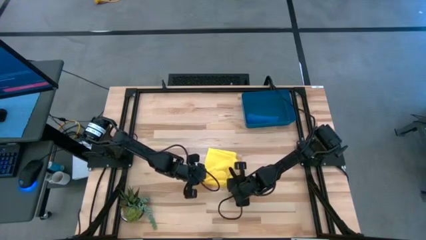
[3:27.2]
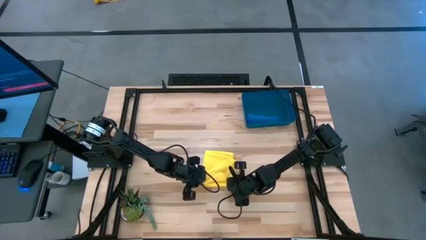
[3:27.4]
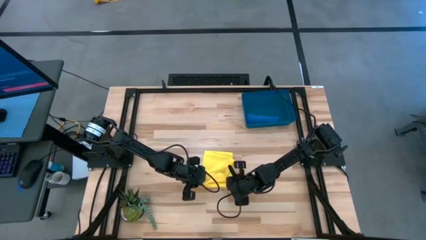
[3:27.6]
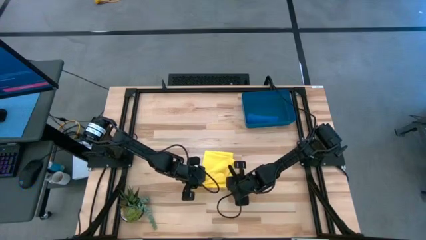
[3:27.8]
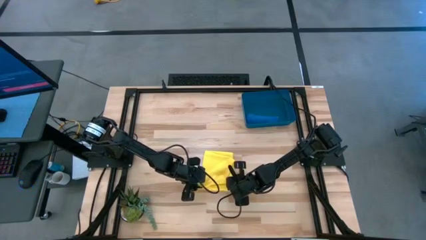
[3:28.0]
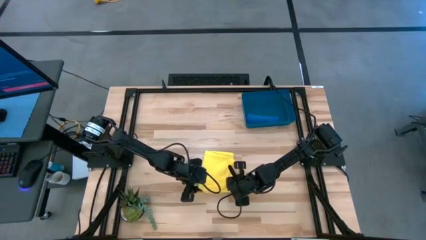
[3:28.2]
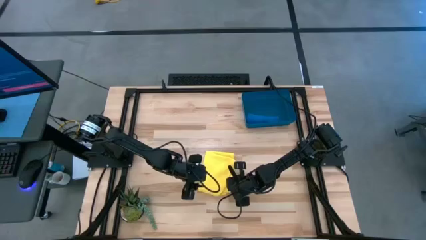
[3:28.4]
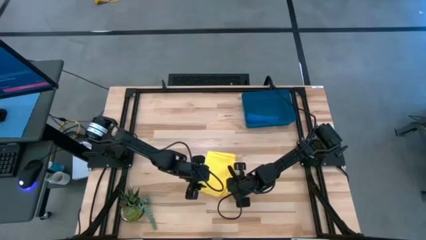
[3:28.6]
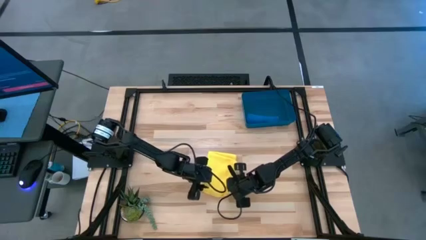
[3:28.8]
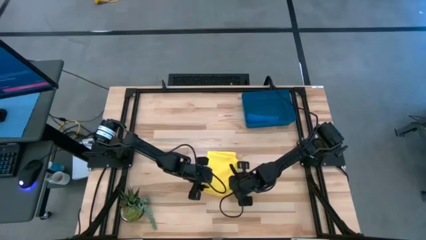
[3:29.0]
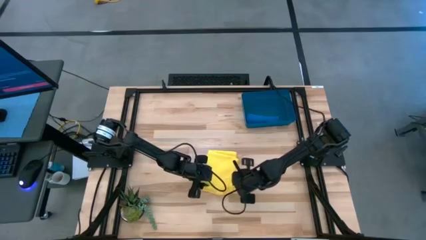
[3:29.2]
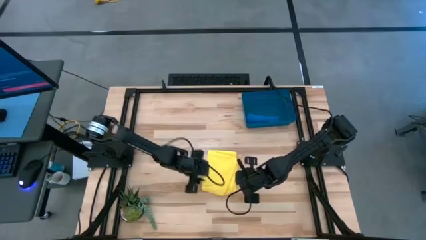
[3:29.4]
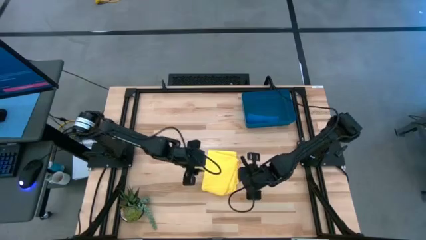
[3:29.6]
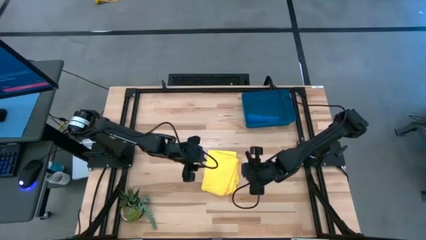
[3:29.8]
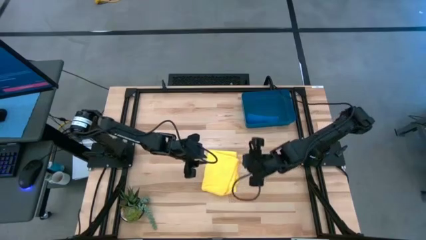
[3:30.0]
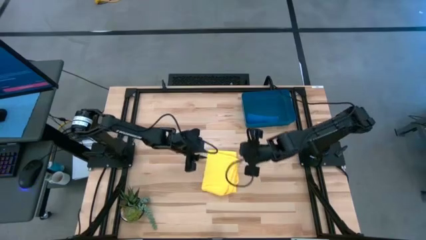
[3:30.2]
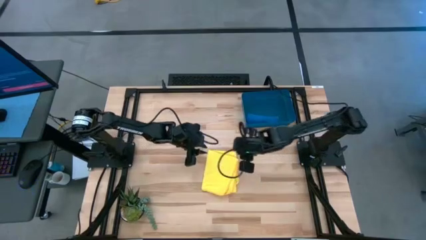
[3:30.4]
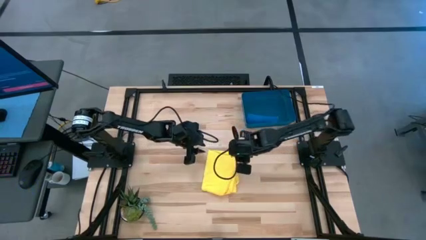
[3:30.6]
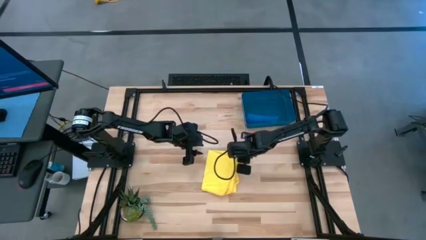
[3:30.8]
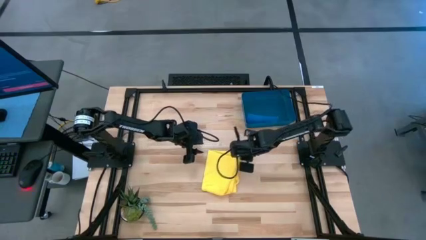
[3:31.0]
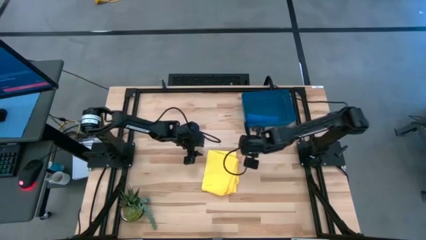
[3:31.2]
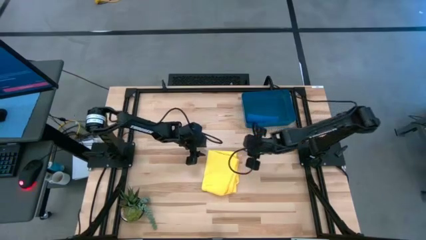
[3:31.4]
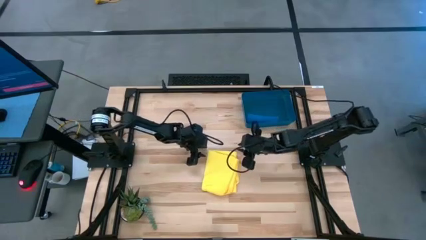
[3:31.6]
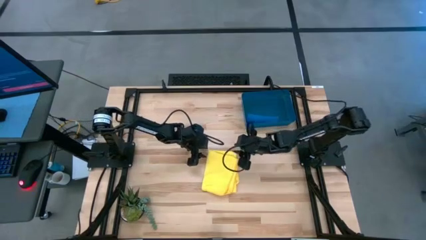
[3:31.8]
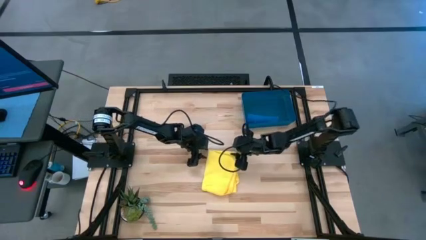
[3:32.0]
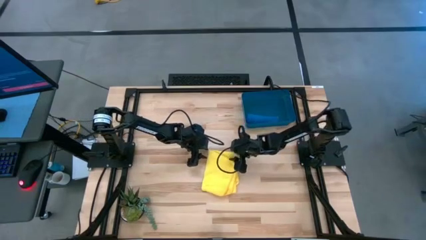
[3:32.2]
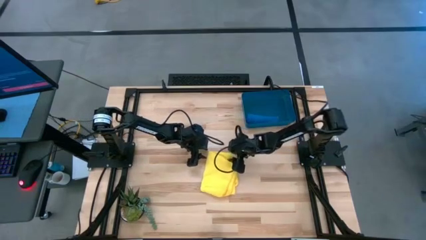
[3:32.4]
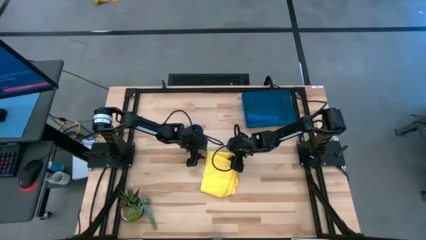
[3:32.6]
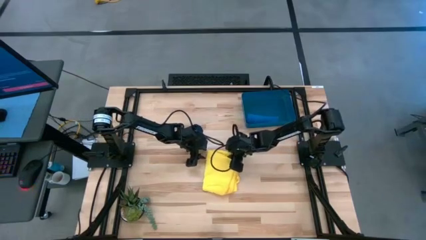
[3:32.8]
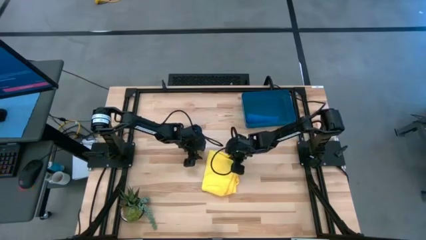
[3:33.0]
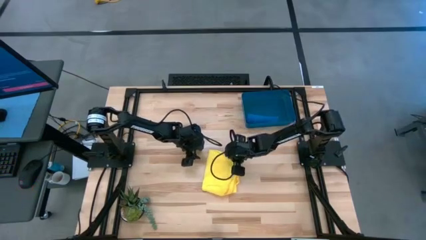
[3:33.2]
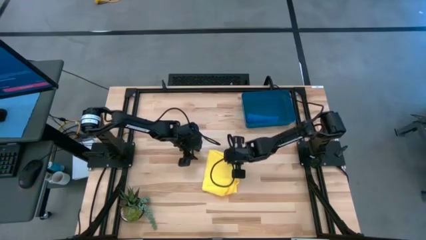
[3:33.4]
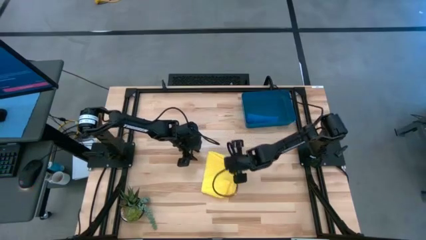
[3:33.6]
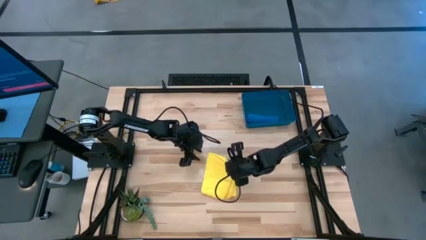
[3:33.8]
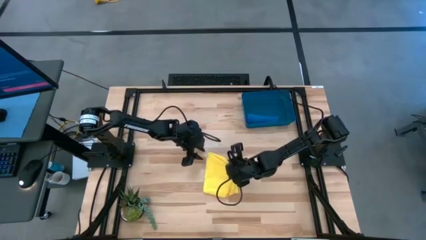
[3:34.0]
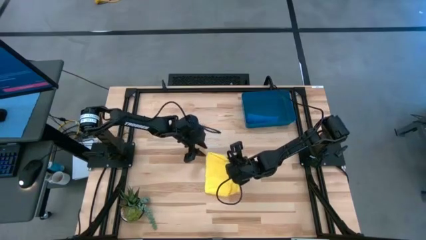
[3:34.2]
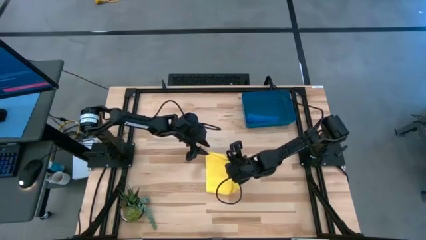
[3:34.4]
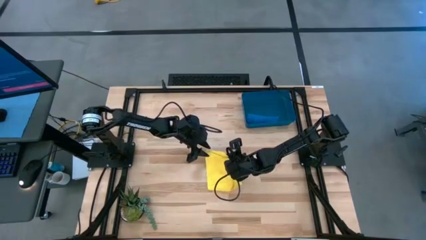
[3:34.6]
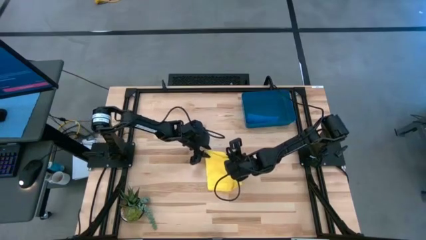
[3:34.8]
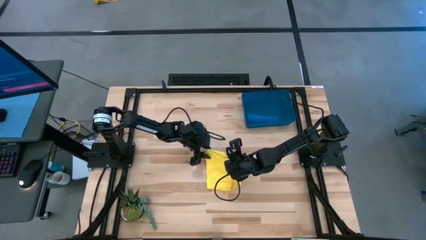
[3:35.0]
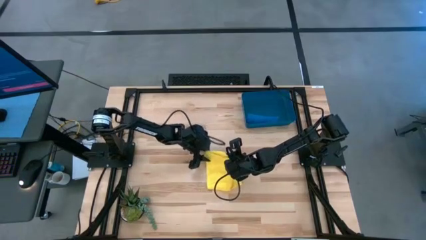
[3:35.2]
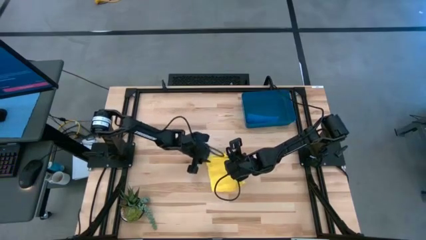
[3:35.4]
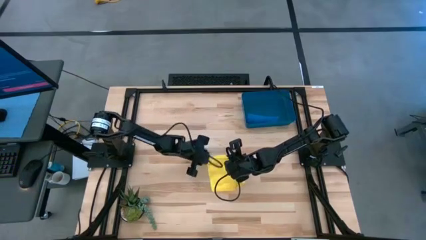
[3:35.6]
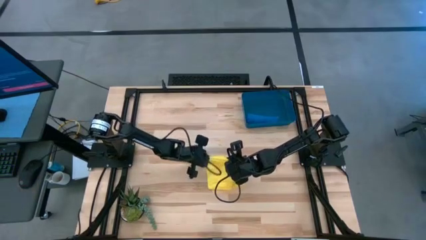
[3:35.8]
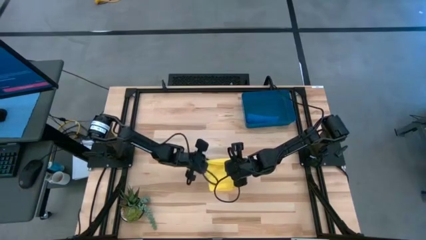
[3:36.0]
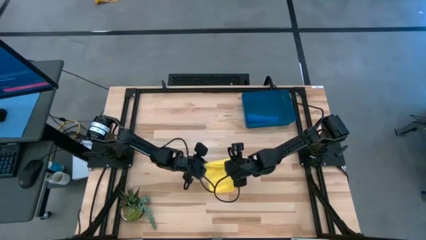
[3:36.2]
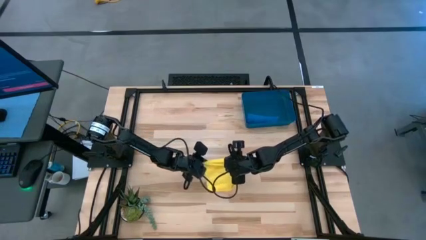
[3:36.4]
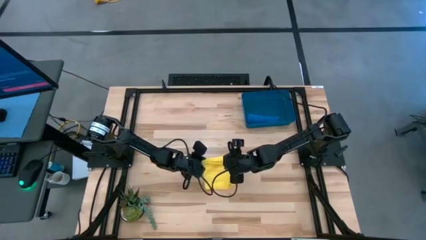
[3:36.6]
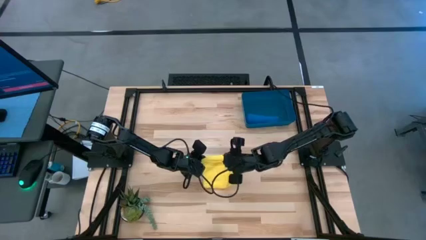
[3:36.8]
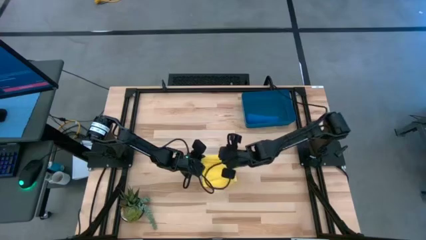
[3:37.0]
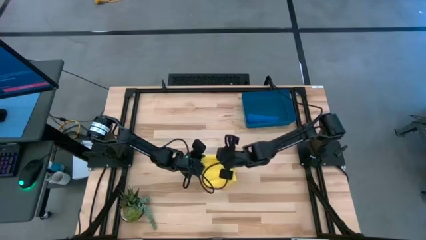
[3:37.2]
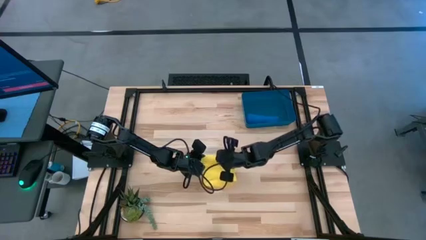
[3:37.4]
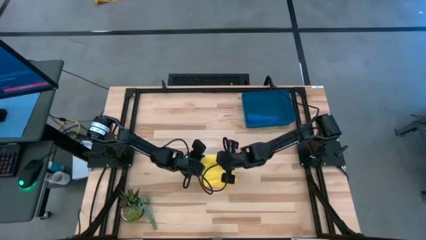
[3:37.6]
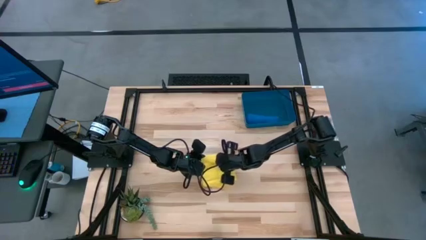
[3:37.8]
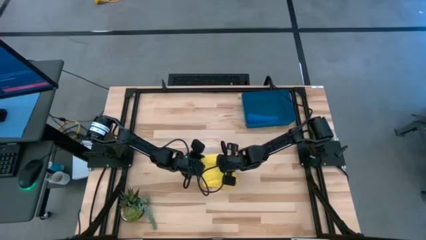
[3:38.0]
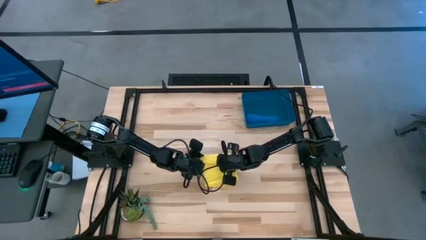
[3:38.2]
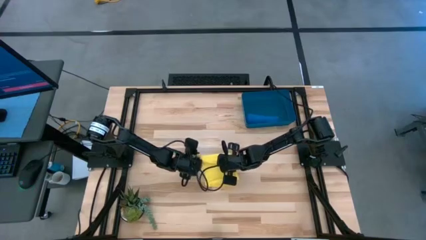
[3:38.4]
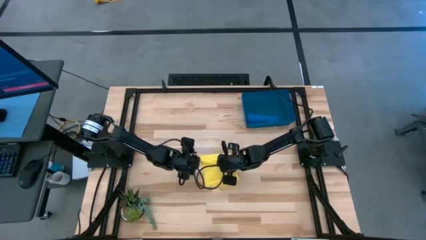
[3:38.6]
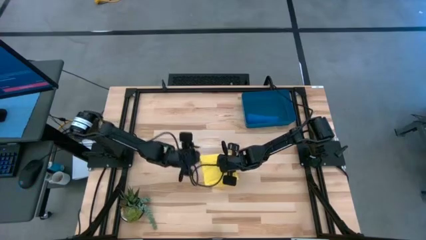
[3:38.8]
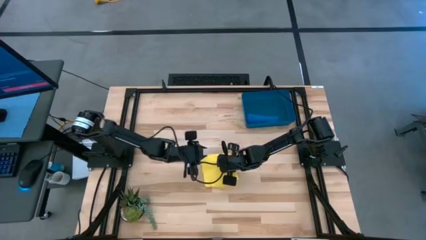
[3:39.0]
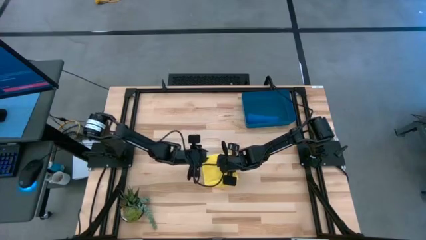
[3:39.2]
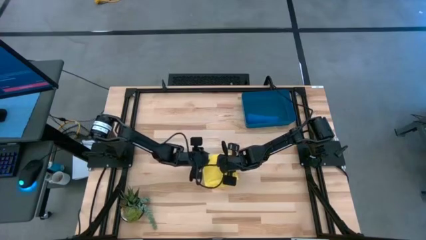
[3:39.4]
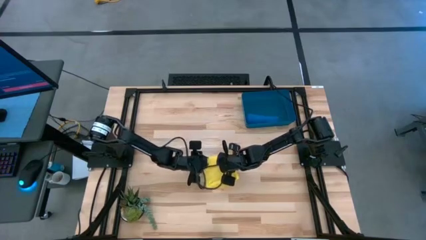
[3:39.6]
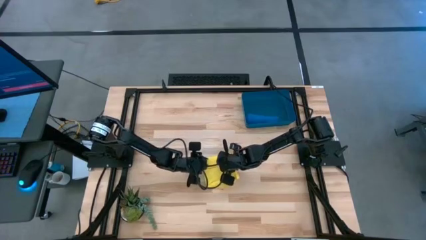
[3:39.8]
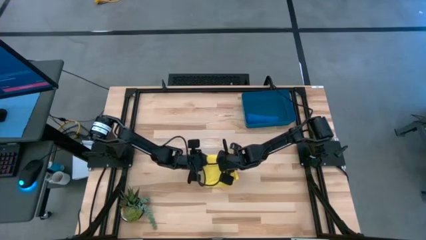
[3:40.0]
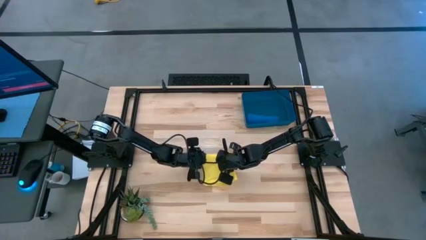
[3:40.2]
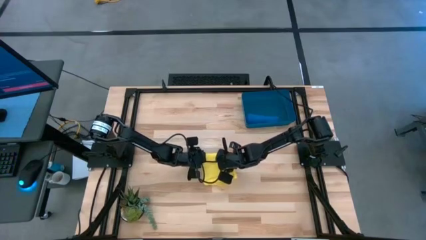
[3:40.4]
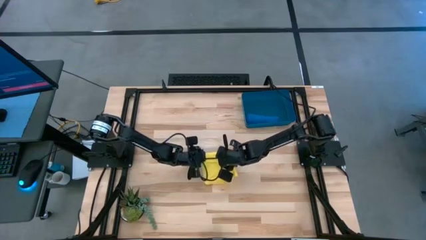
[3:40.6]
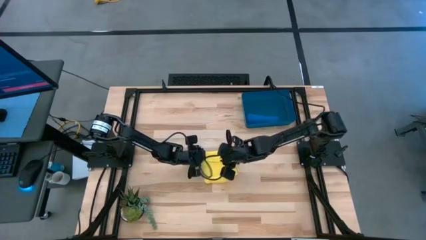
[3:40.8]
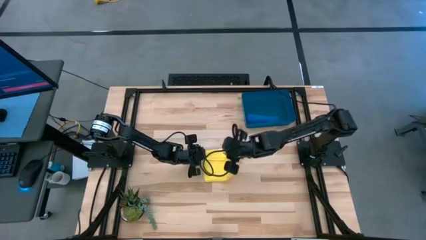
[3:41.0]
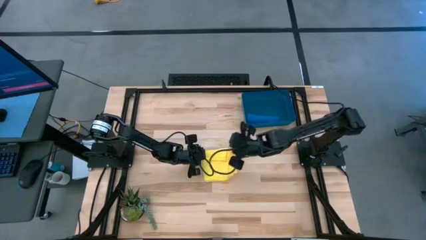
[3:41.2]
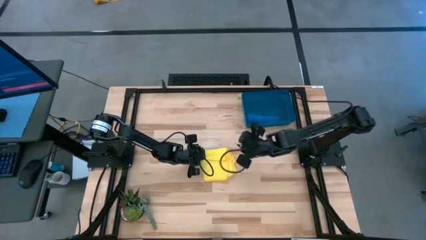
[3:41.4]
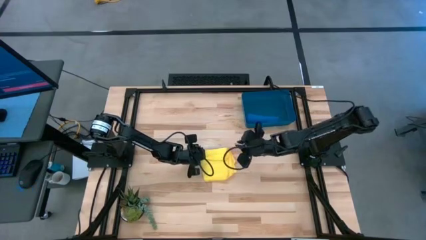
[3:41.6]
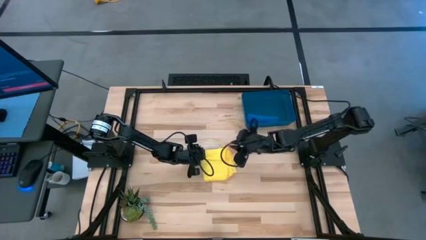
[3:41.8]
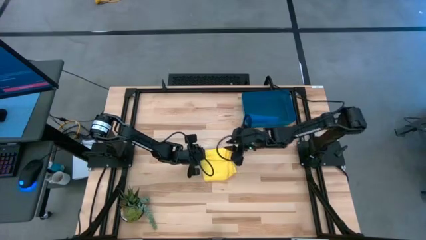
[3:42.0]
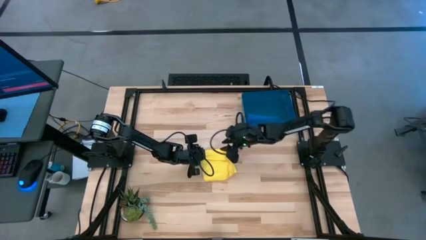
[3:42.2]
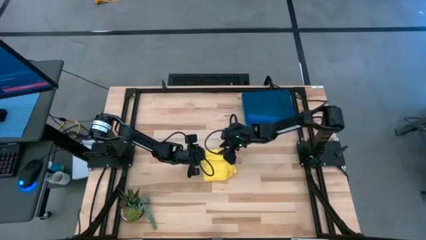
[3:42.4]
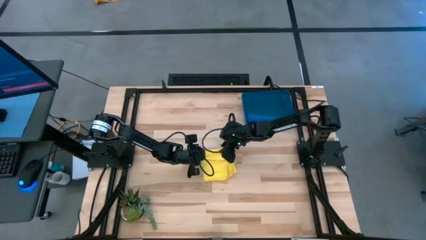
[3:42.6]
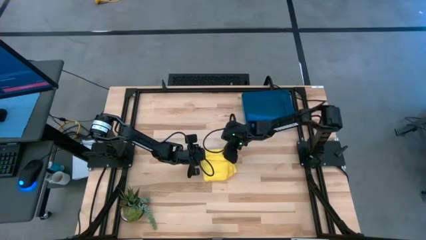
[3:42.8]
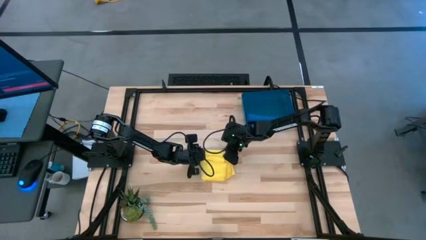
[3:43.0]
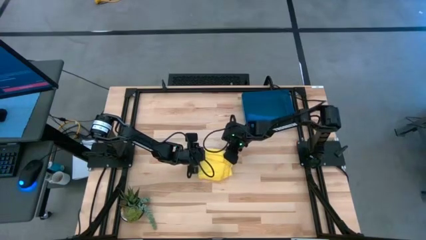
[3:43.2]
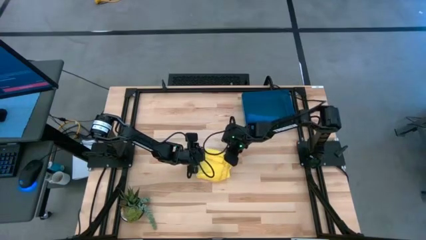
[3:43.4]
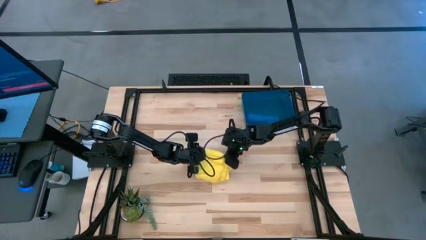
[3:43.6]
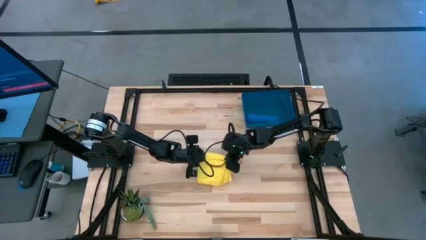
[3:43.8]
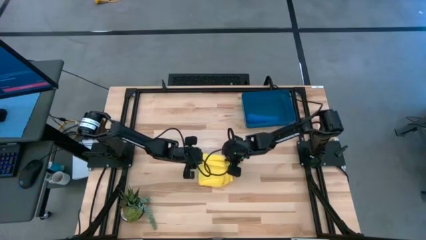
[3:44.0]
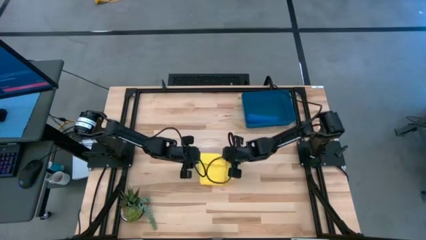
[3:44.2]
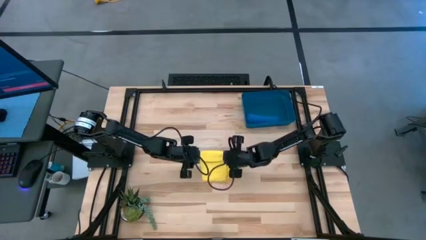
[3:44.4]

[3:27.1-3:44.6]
Task: Roll microfiber towels into tight, uniform cylinder then place into a basket
Roll the yellow microfiber cloth
